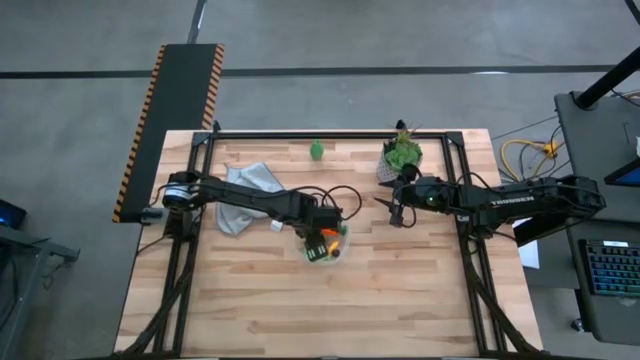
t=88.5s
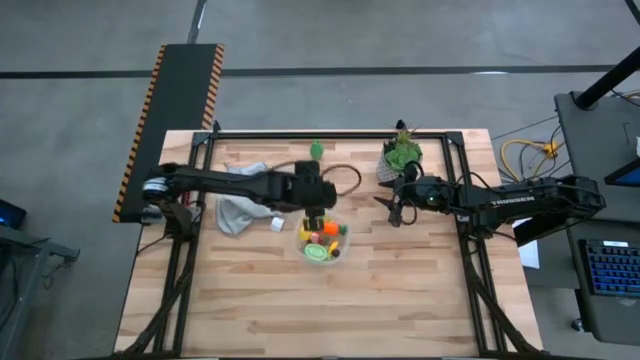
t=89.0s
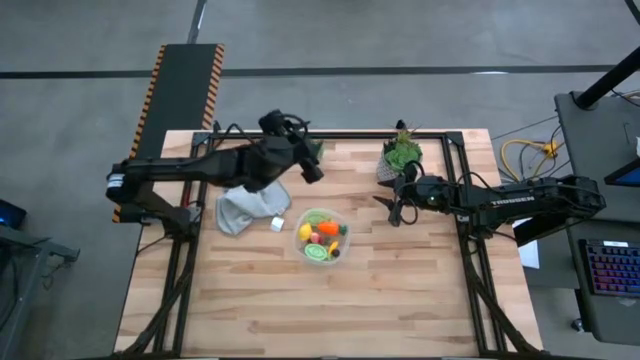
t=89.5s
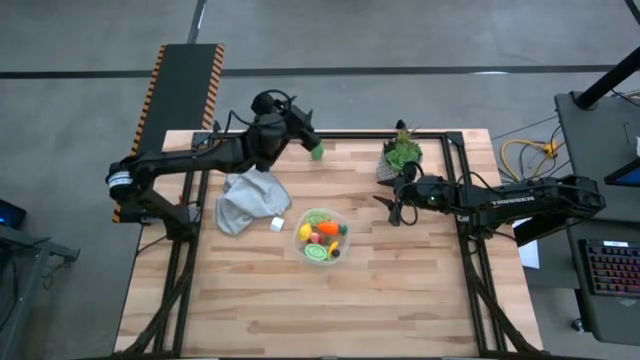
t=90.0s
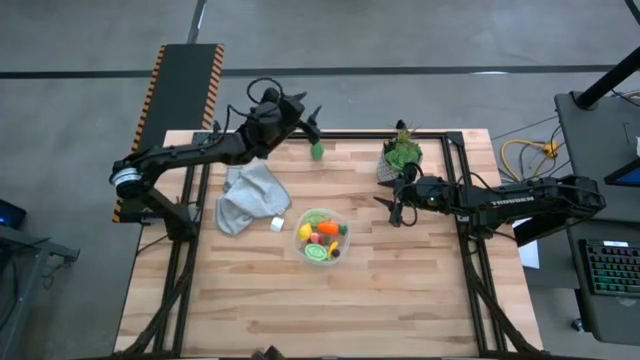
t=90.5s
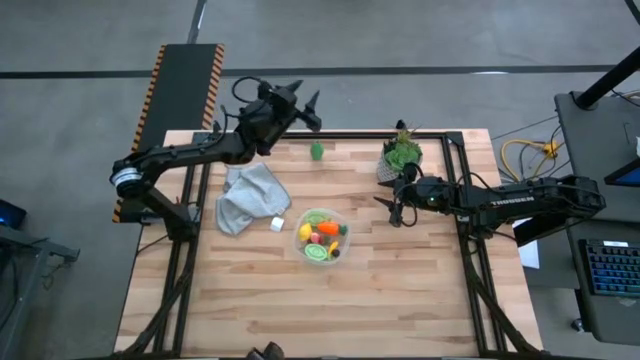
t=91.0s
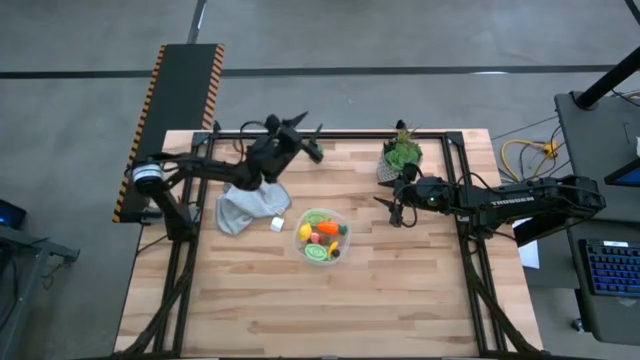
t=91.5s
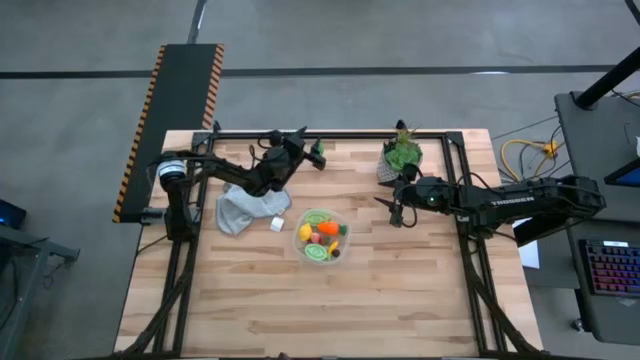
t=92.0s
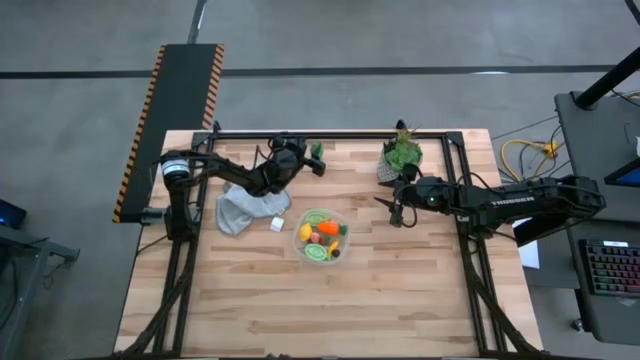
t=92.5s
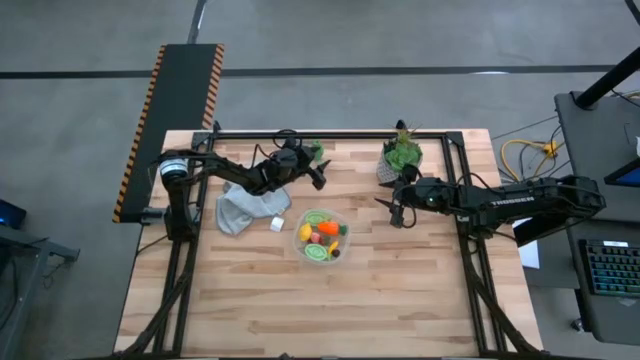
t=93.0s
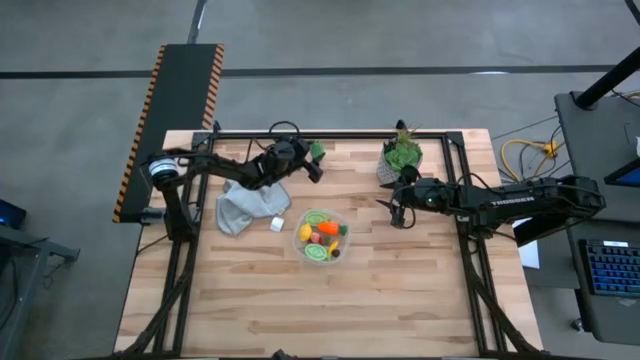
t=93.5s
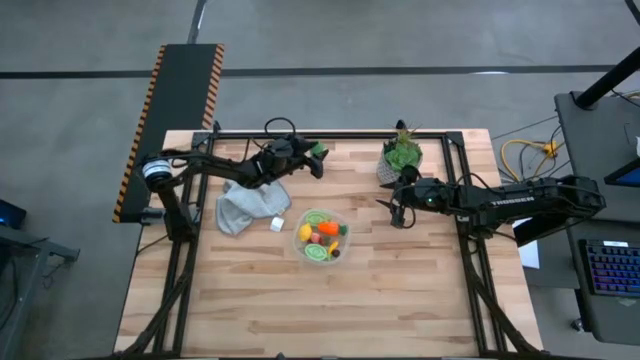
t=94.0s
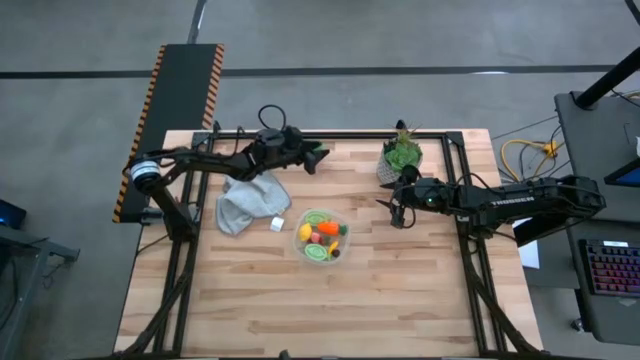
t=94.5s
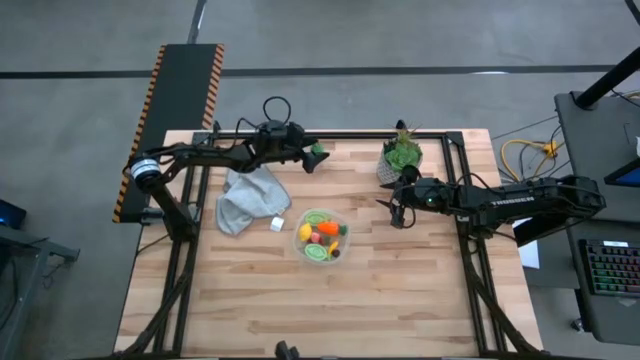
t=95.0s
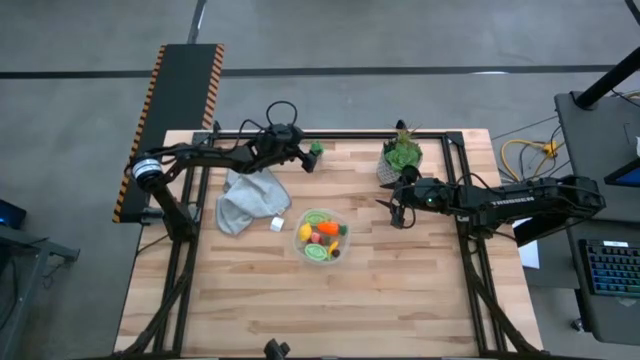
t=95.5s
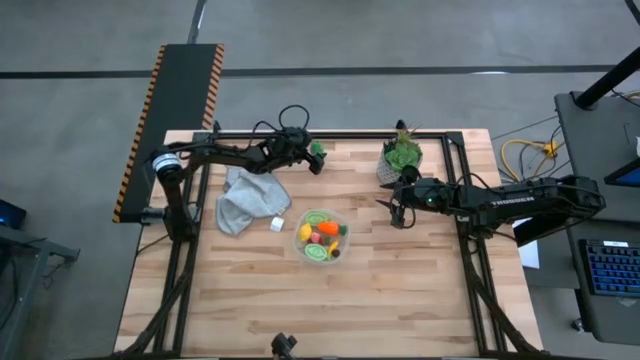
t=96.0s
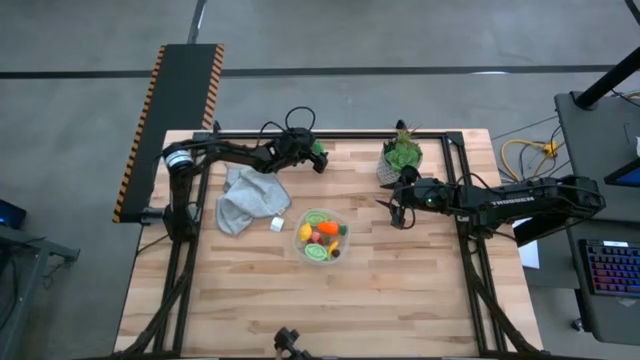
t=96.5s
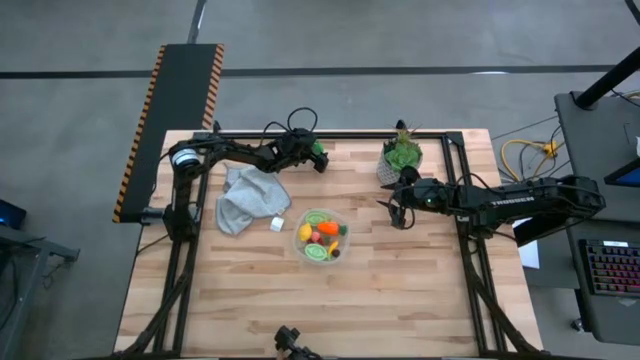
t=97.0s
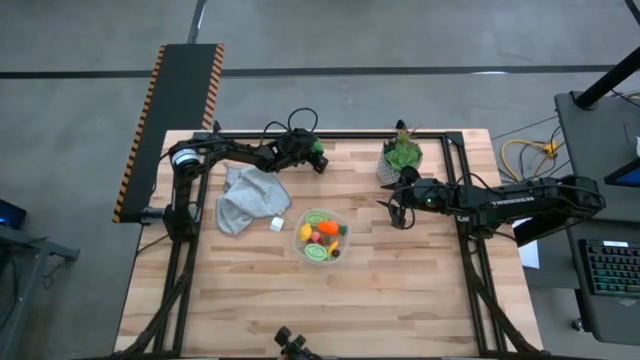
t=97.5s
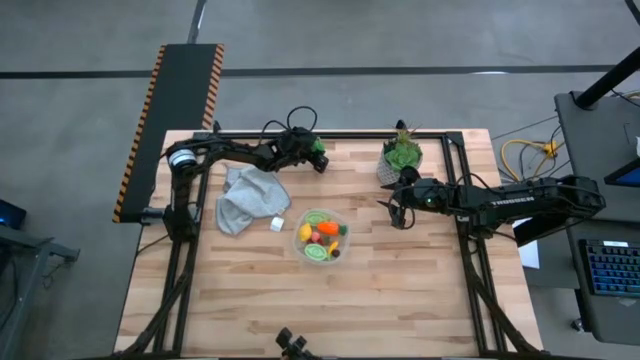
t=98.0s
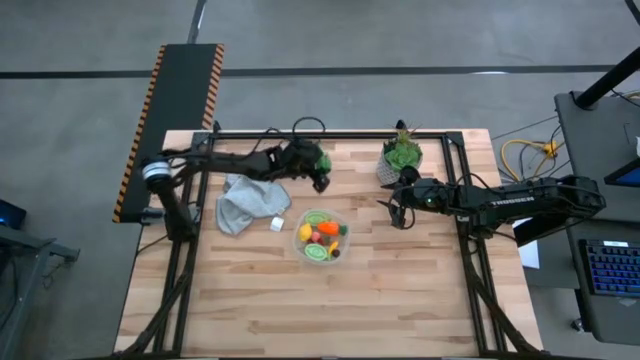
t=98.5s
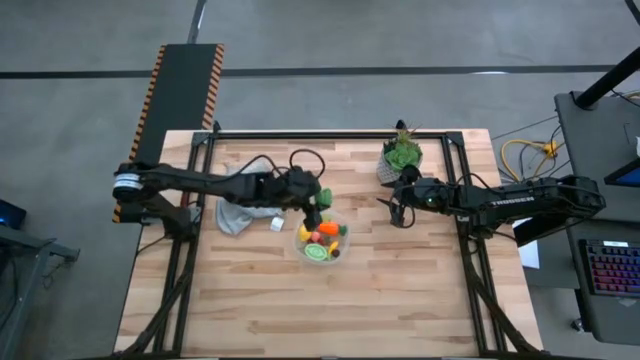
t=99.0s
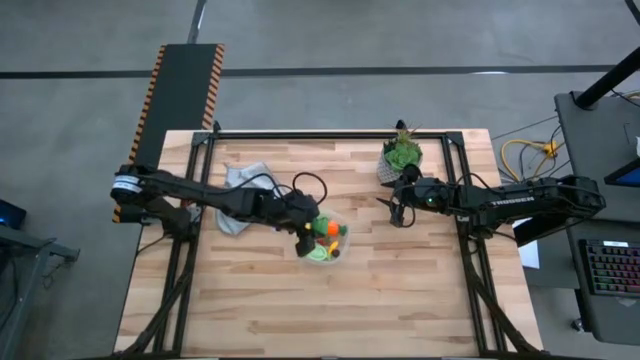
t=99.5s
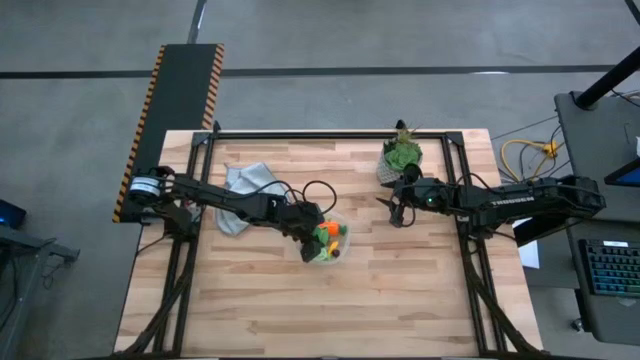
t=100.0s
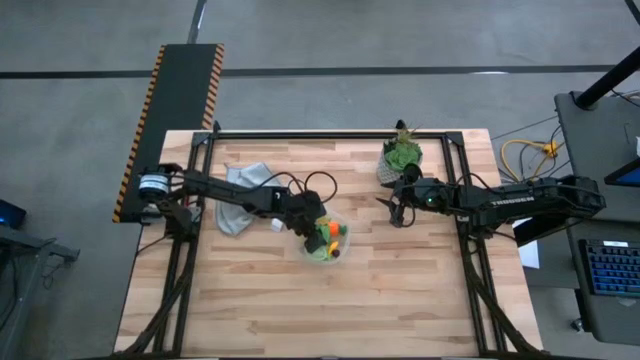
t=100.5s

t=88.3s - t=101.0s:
Task: Pick and placing Produce into tupperware
Put the green corn into the transparent bin

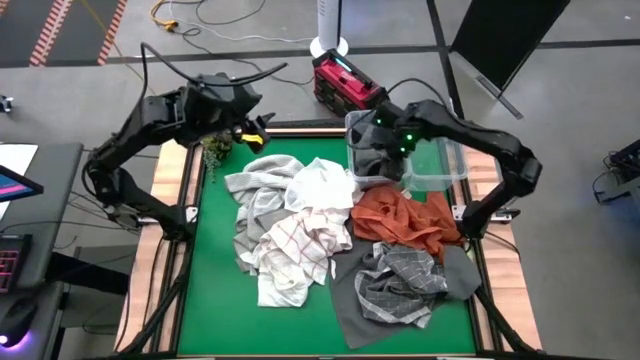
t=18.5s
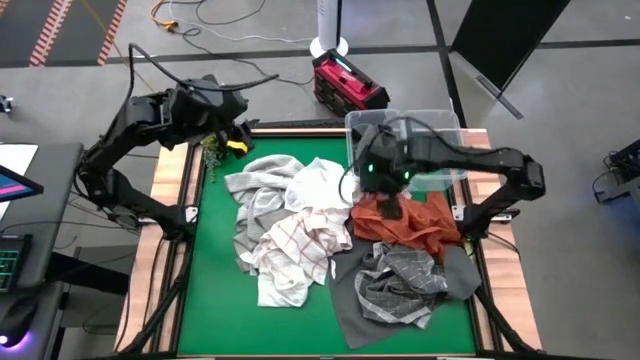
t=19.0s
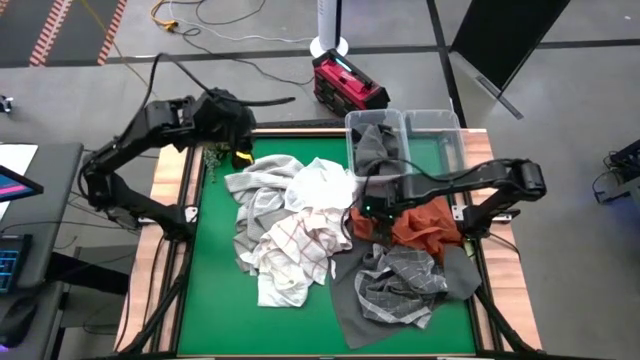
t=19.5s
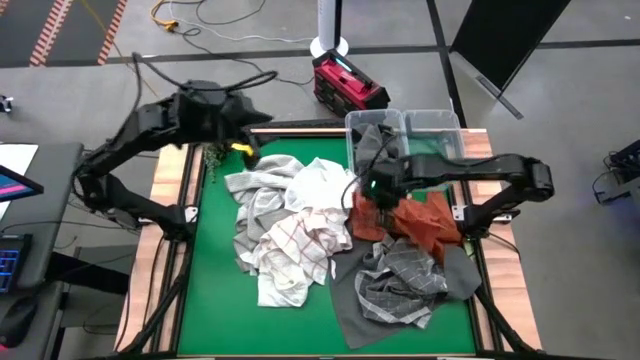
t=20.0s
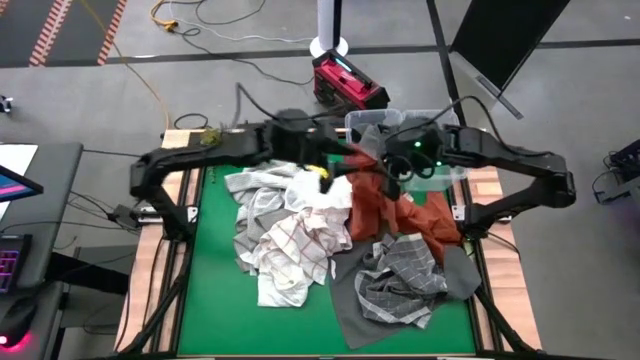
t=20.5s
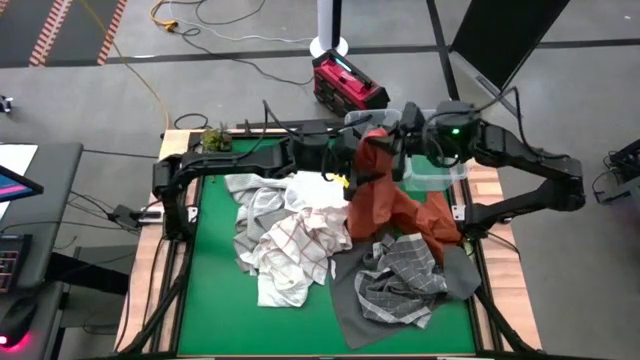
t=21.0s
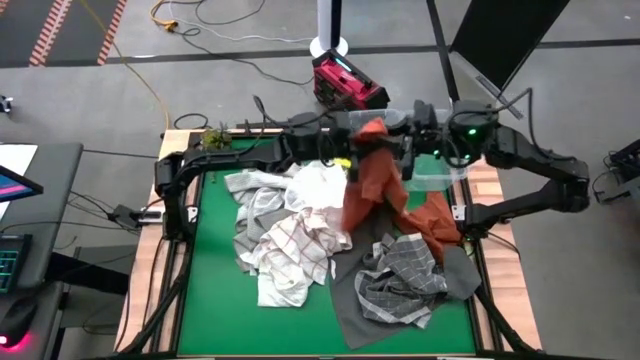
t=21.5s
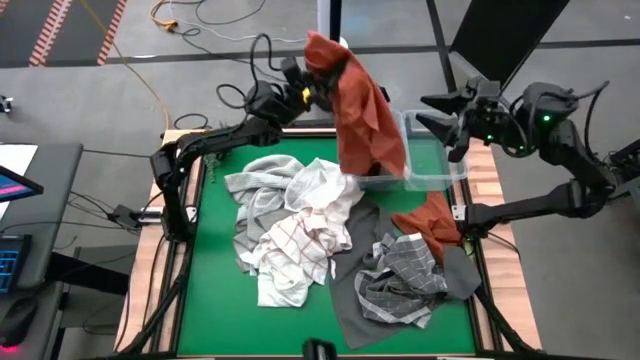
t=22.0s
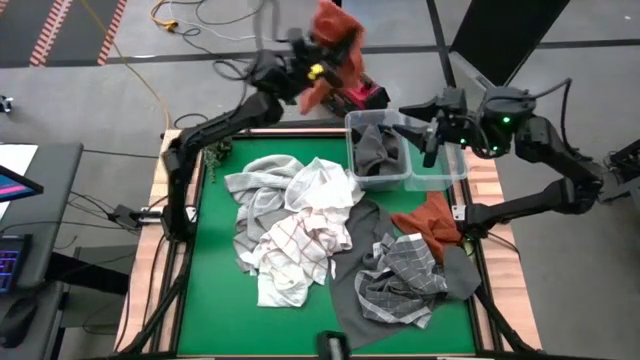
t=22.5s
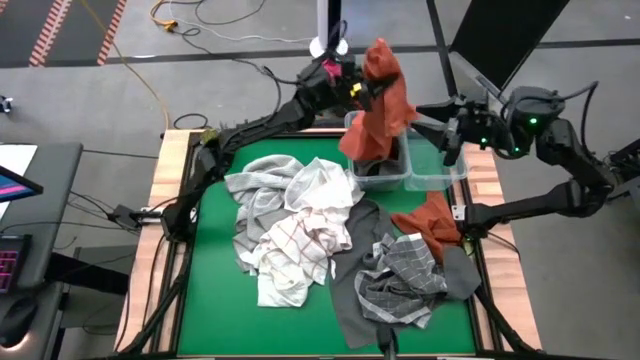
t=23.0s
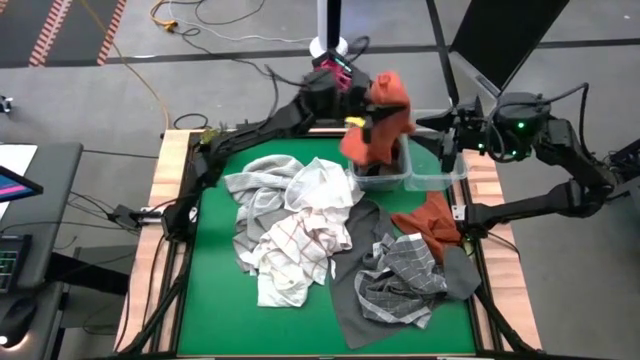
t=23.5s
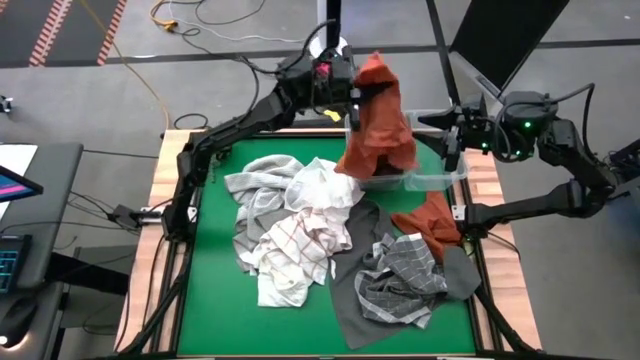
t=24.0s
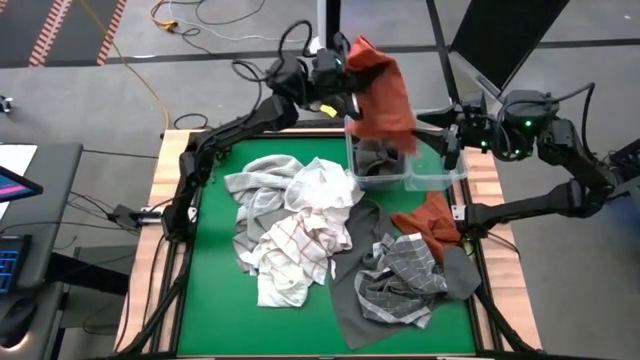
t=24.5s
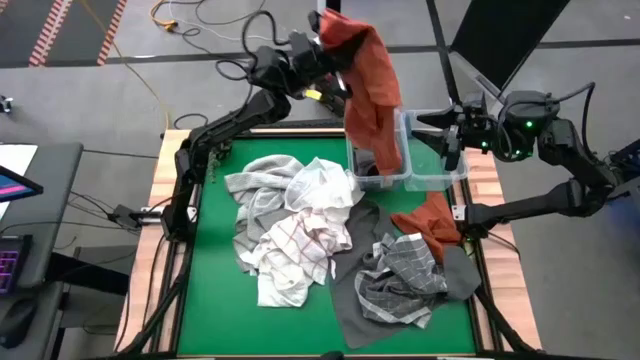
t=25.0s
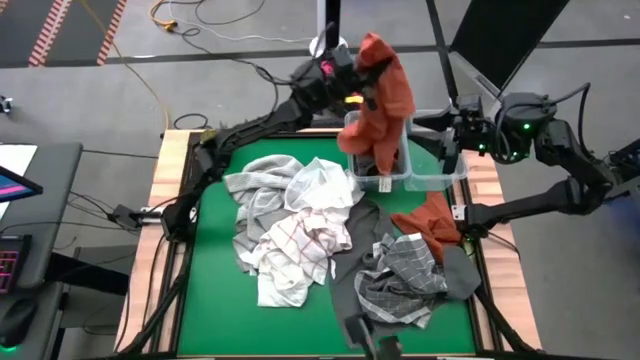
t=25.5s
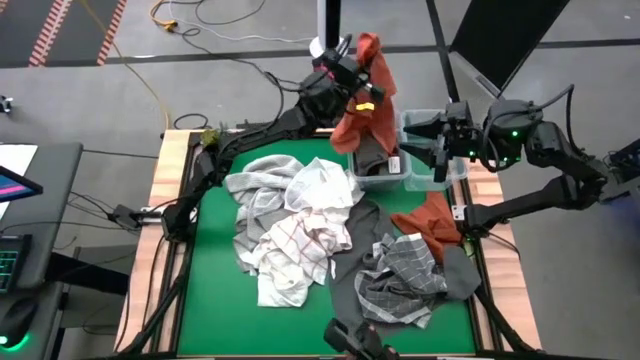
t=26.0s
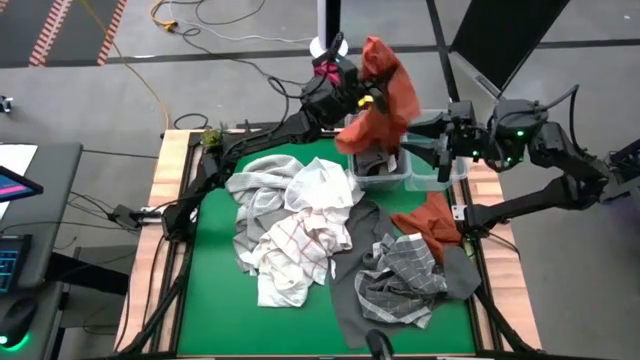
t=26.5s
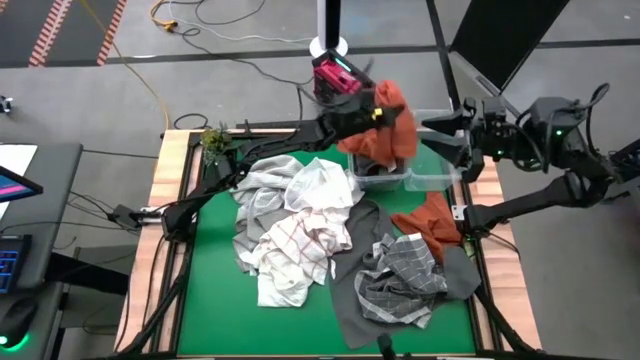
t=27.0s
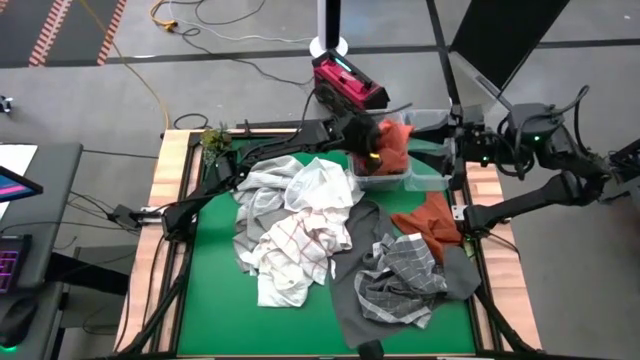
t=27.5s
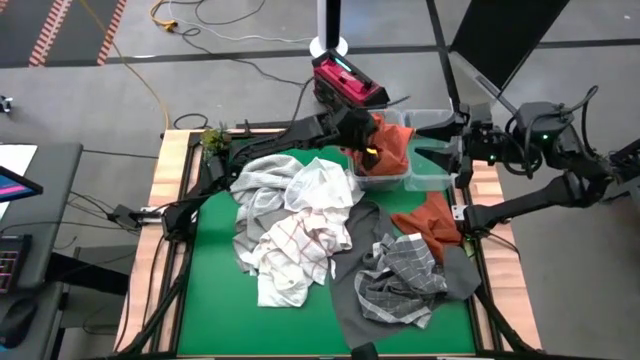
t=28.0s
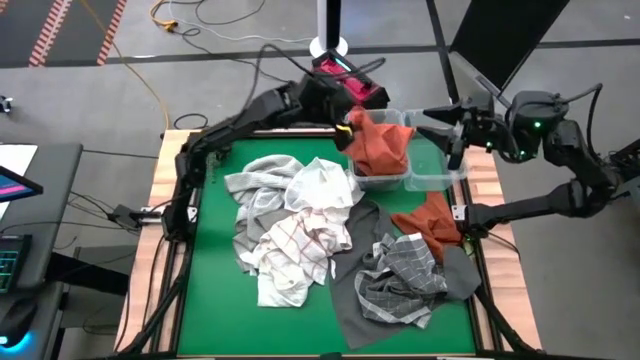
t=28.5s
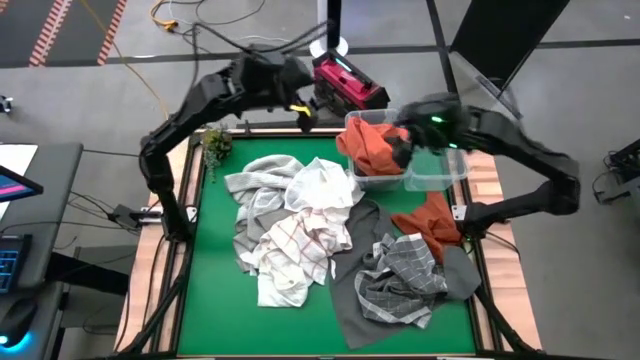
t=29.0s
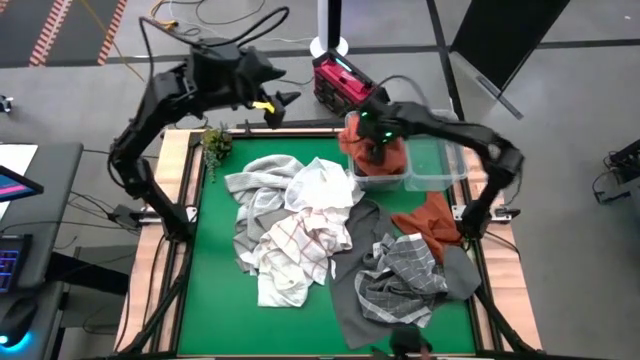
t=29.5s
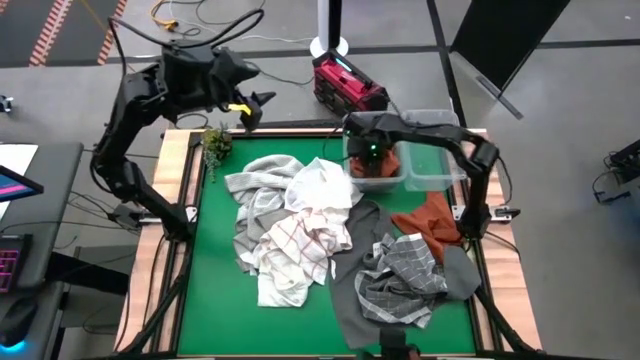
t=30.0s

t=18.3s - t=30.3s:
Task: Sort towels by color in basket
Put the left orange towel into the left transparent bin
